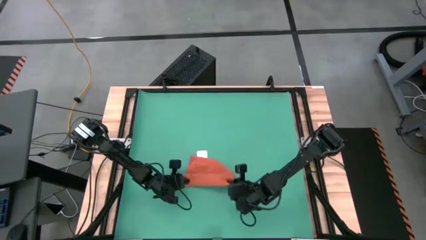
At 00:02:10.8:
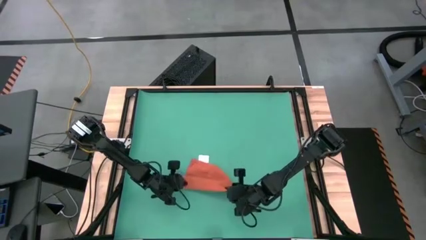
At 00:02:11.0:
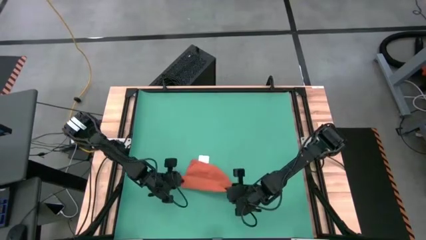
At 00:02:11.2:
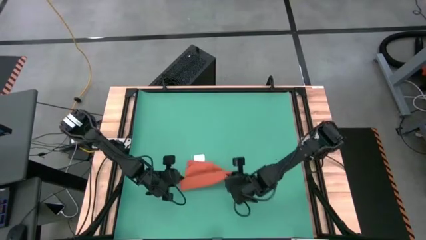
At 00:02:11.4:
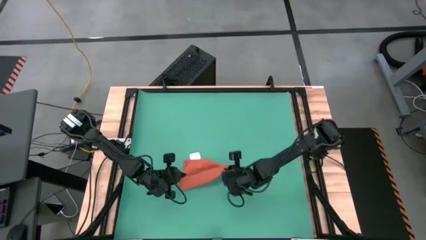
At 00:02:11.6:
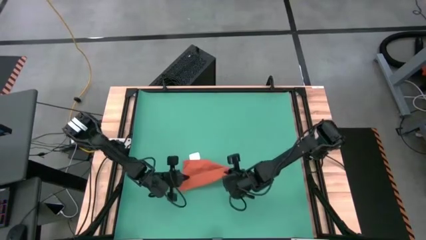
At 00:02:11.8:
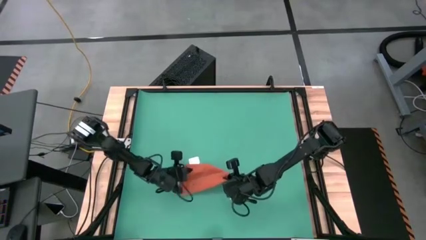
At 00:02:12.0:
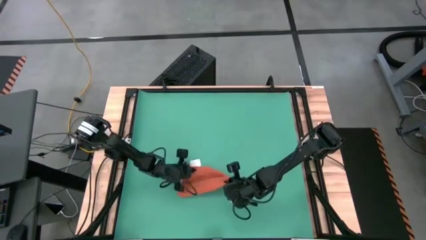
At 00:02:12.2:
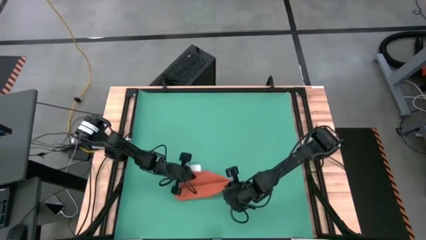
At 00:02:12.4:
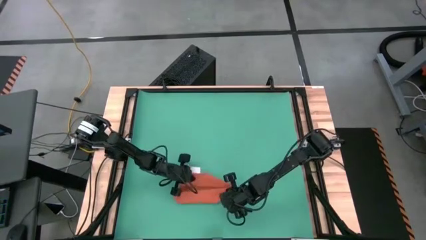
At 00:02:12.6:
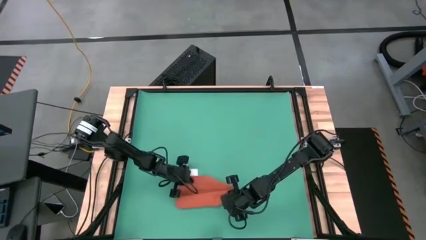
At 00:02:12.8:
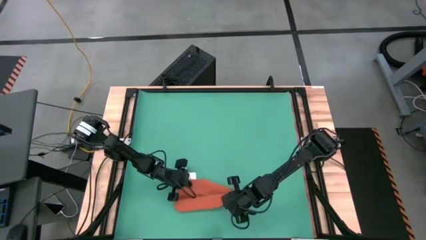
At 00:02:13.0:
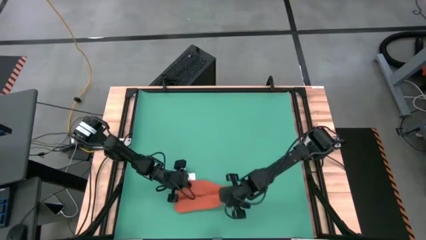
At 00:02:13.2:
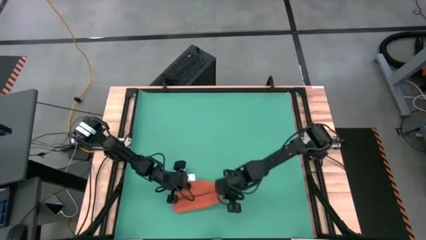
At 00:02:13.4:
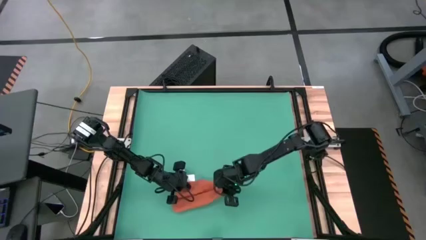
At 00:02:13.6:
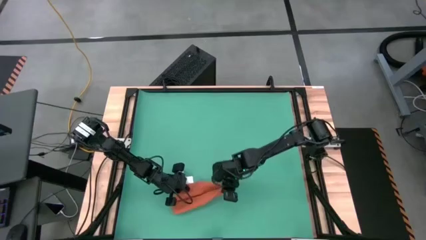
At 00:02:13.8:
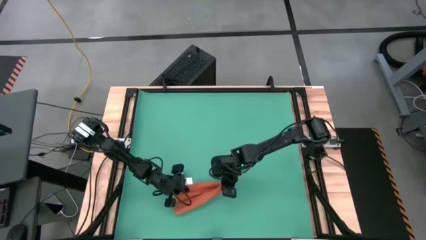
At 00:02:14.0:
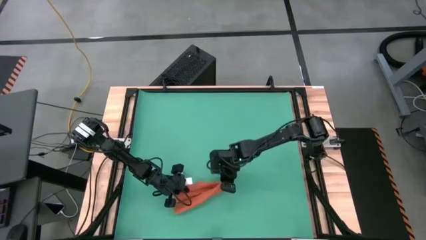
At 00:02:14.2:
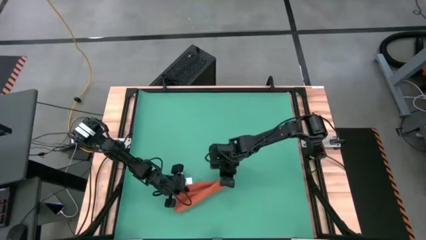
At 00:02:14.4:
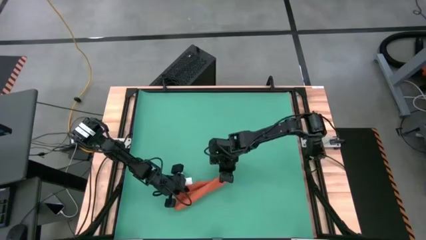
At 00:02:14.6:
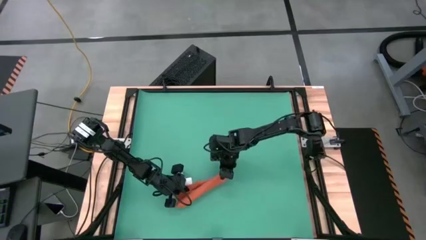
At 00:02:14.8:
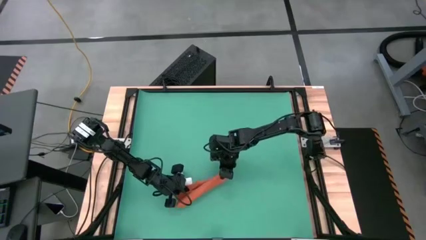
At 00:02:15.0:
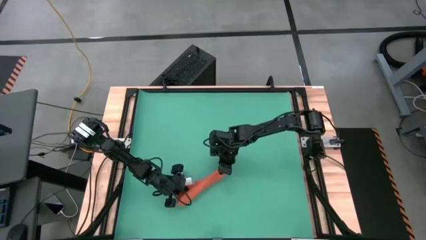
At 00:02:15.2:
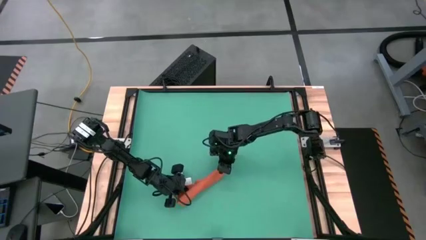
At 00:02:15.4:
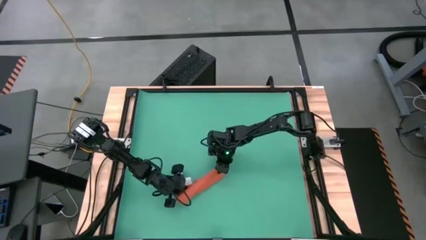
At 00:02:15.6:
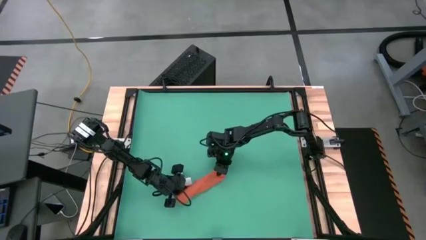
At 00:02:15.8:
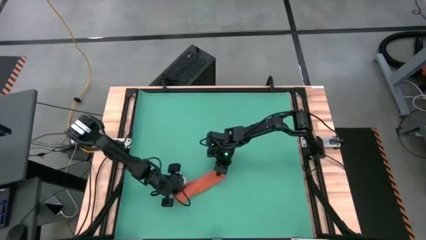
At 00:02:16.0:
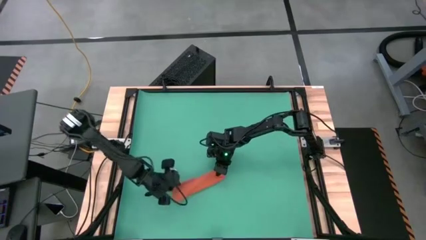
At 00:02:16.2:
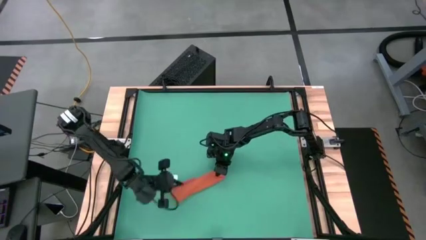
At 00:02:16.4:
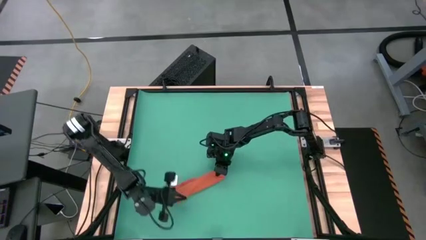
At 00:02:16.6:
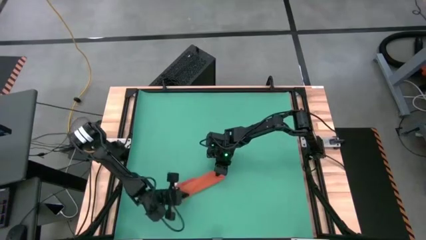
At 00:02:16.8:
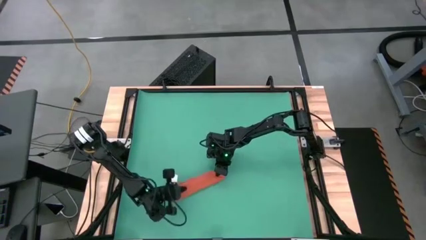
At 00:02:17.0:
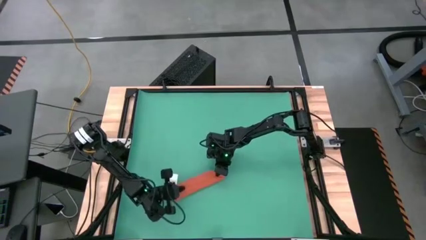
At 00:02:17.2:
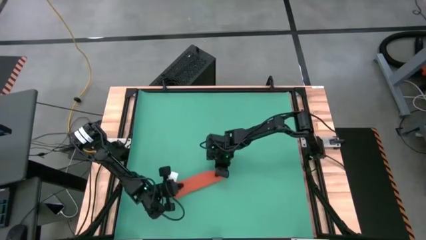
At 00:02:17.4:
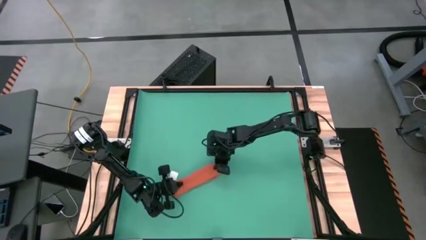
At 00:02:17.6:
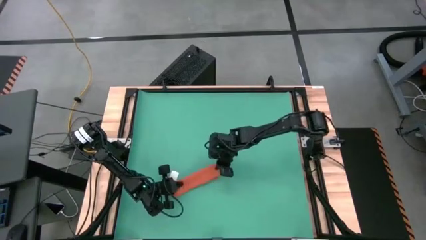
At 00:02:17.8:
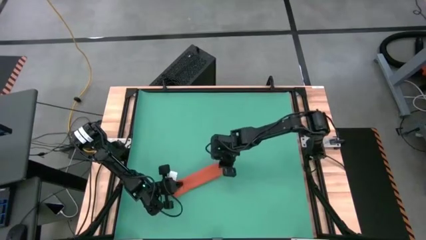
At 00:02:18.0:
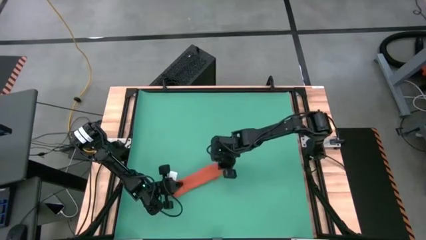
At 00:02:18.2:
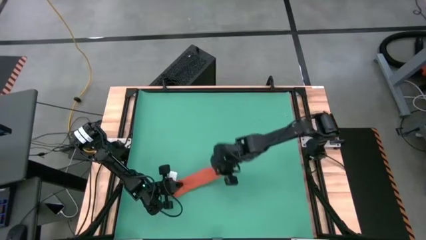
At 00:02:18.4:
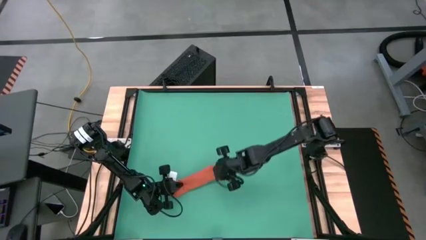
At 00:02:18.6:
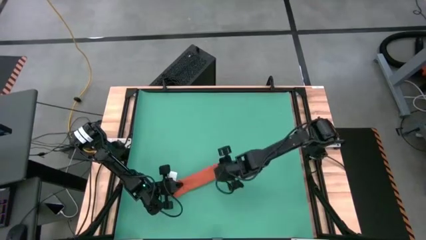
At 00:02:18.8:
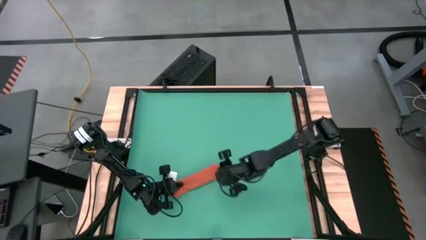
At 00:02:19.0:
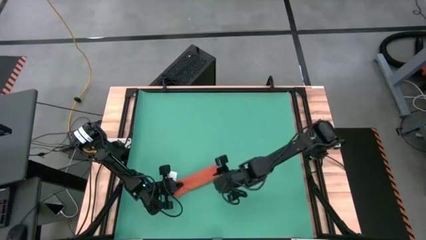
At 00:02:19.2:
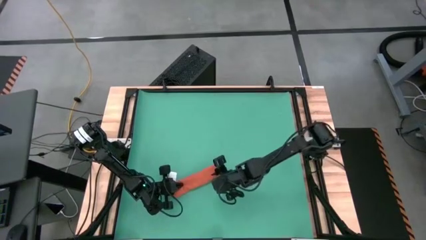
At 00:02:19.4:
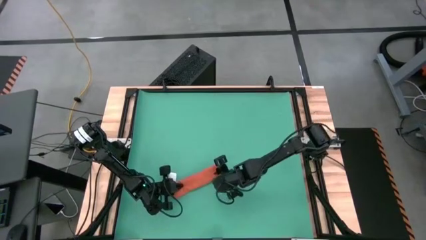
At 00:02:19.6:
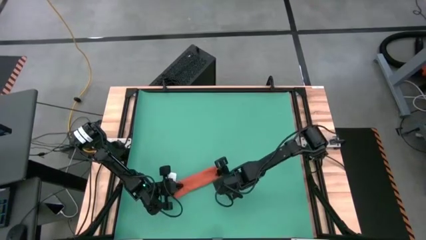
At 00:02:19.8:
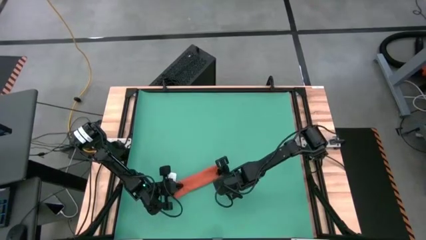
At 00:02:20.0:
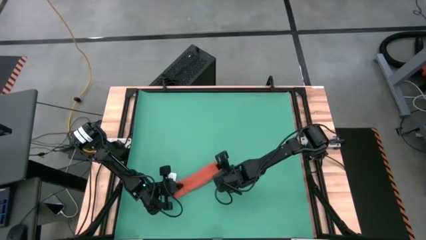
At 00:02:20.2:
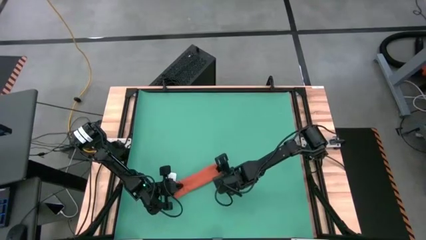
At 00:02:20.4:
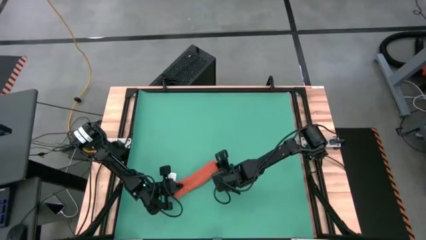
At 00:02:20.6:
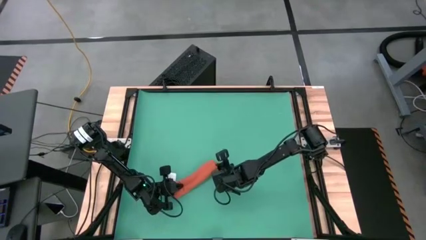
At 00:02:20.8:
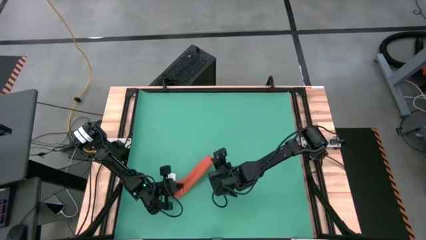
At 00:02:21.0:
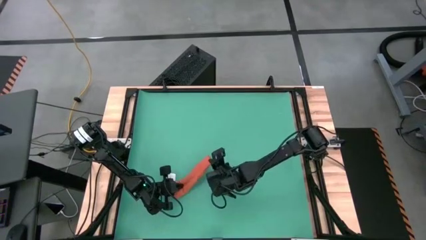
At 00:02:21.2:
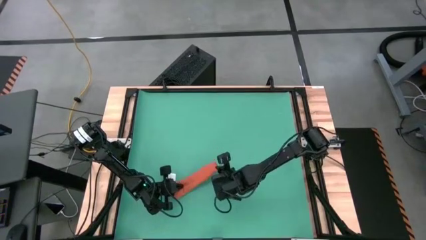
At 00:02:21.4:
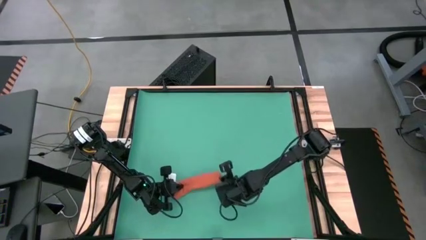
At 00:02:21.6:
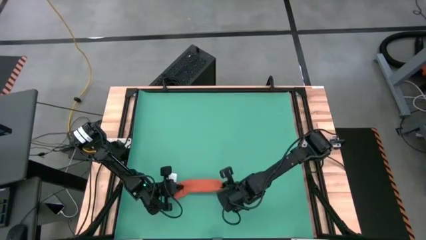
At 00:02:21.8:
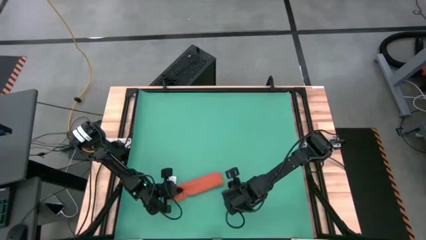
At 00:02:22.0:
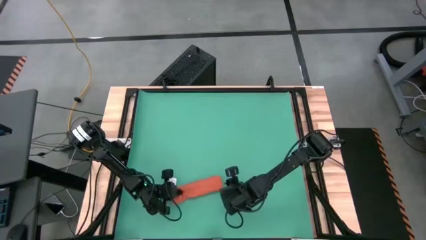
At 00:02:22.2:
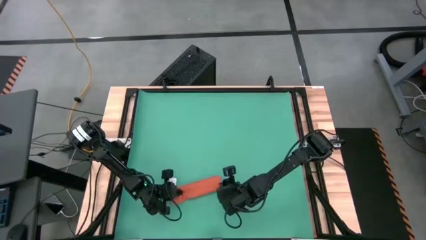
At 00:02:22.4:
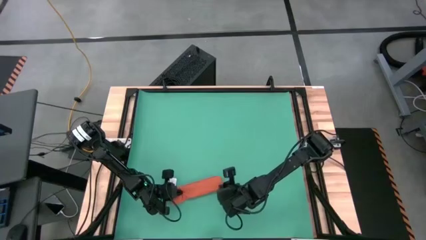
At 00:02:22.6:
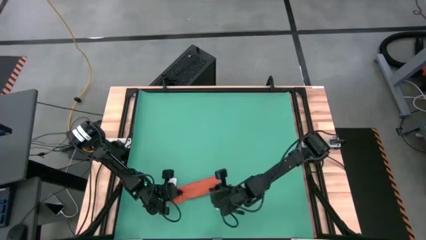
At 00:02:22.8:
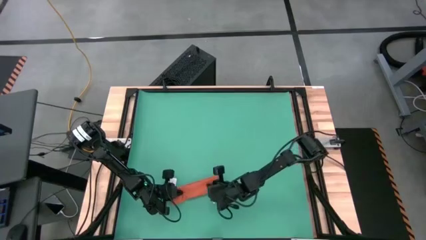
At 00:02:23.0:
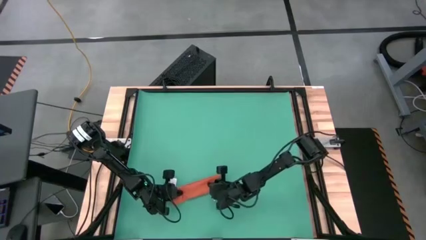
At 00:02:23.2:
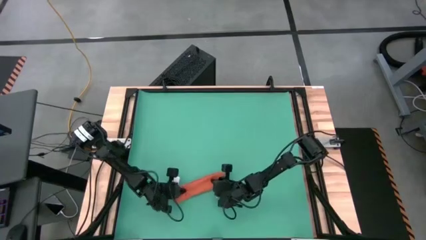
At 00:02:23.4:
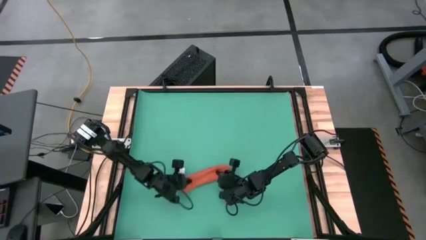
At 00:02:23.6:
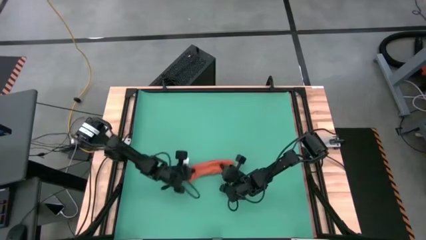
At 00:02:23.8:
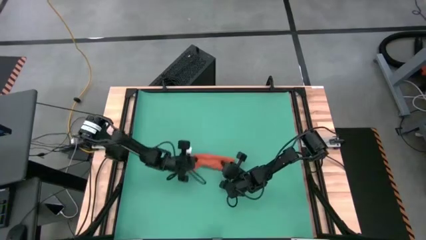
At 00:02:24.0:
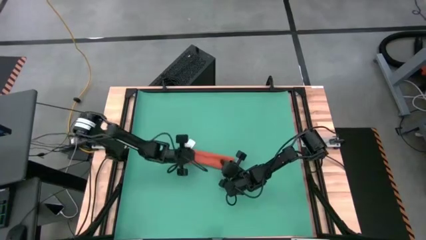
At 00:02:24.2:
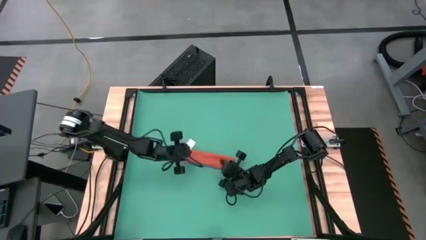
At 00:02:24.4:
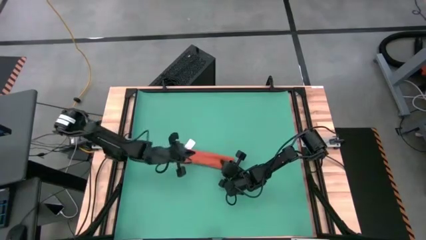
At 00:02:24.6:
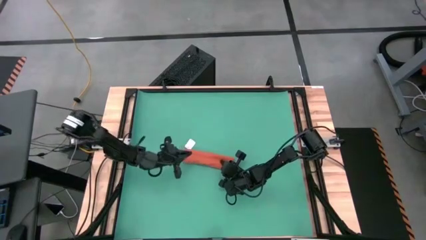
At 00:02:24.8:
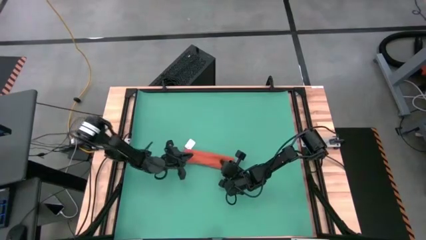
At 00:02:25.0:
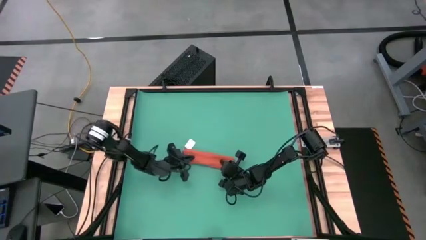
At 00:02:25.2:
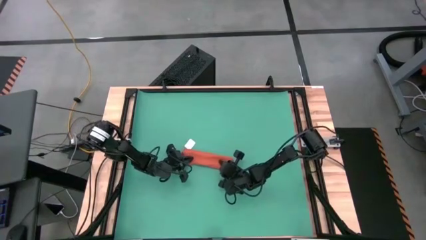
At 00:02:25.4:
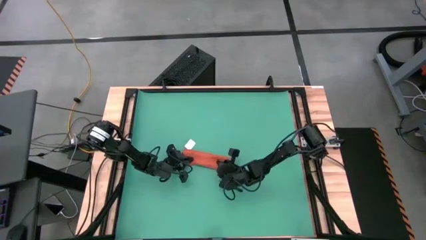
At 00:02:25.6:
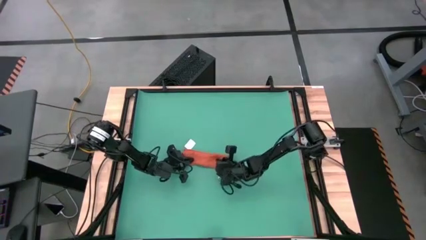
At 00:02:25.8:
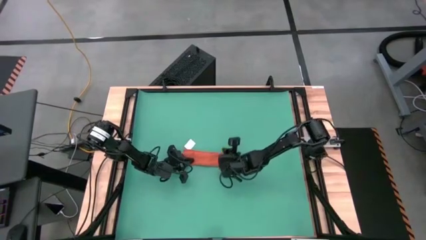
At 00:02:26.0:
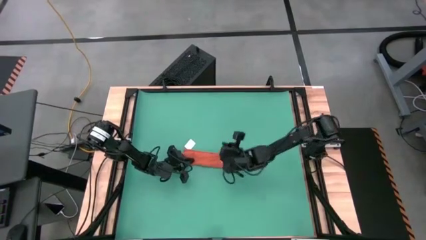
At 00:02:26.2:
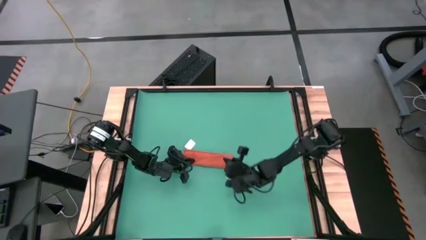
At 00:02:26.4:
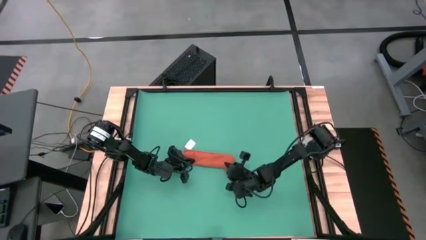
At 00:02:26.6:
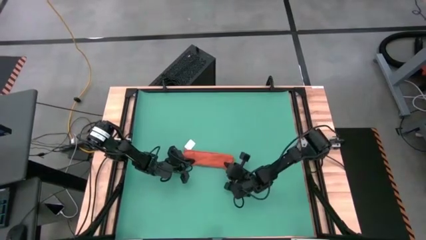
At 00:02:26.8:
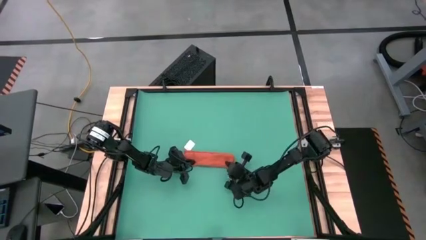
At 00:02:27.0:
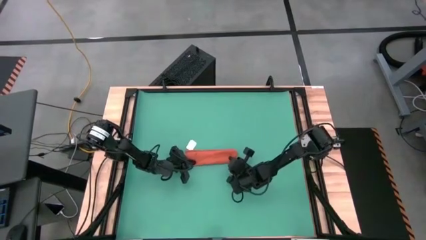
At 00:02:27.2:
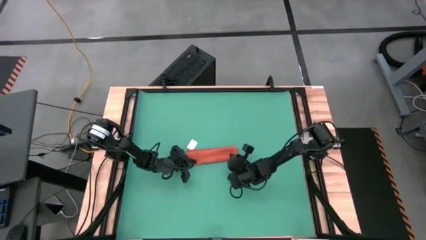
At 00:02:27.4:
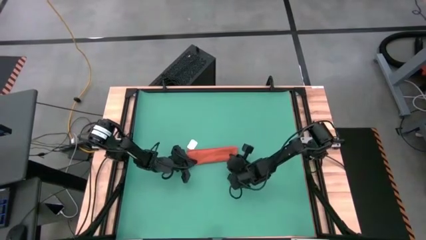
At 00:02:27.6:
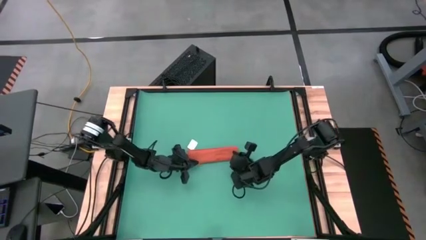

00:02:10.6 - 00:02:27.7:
Task: Roll towel into tight, uniform cylinder
Roll the orange towel
